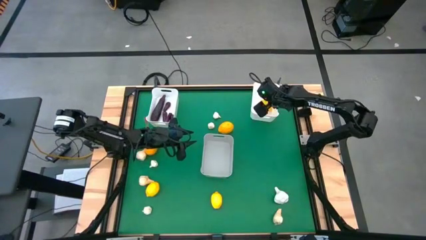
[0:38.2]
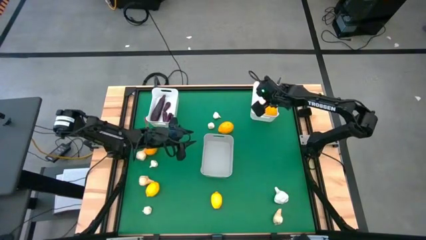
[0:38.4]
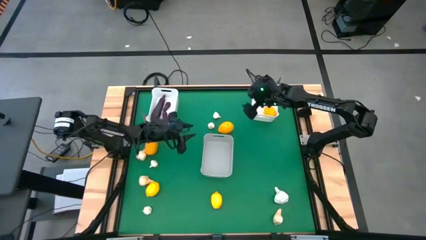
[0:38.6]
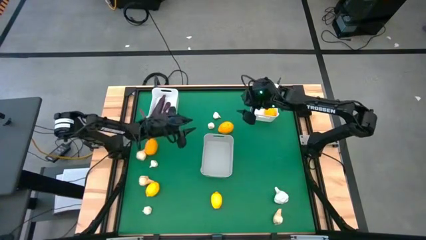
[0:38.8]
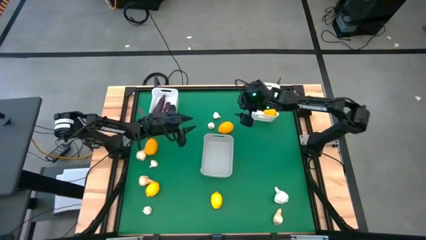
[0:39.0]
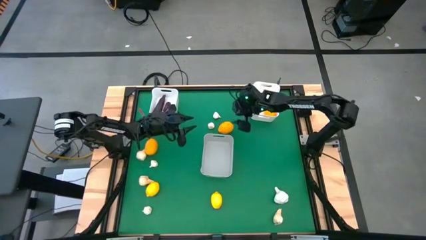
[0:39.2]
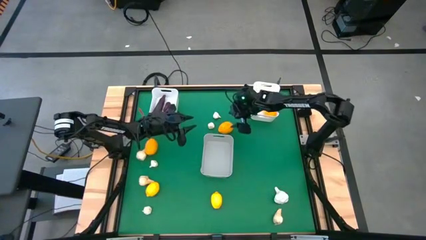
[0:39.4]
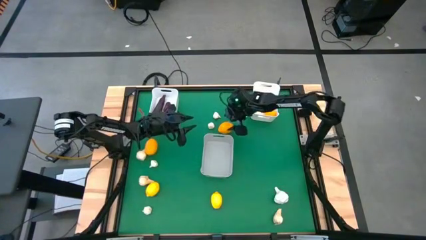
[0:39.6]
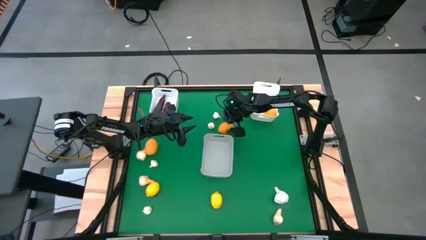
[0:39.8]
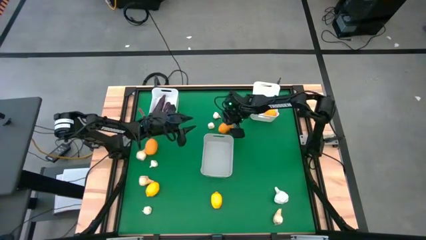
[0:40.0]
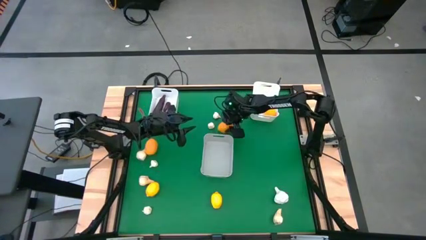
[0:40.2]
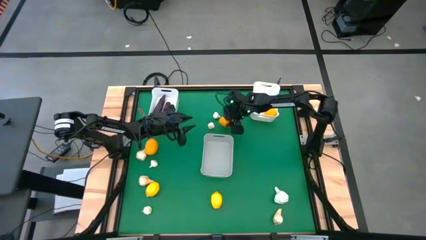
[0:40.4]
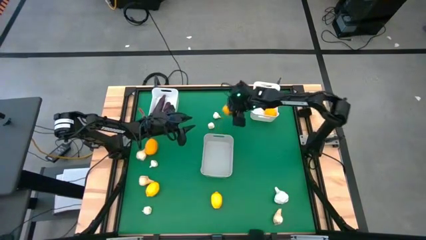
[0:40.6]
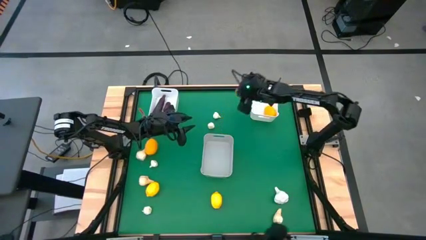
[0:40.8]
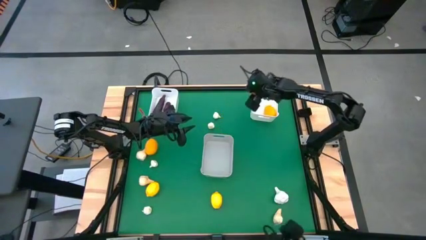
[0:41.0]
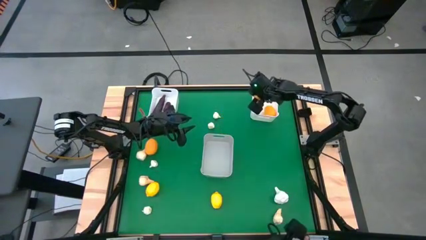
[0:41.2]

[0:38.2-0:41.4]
Task: Sort produce into baskets
Put the lemon into the right white bin

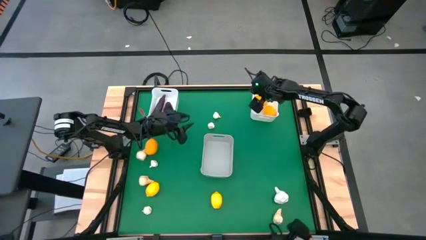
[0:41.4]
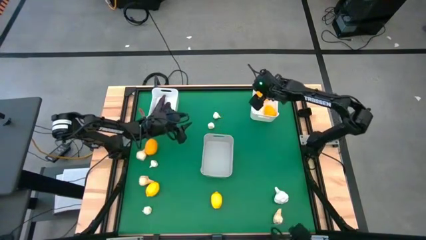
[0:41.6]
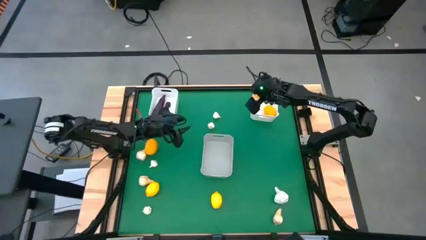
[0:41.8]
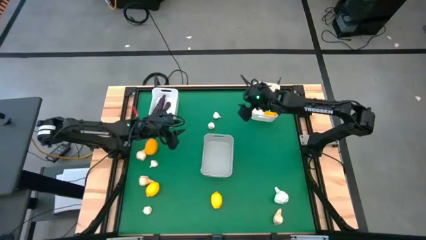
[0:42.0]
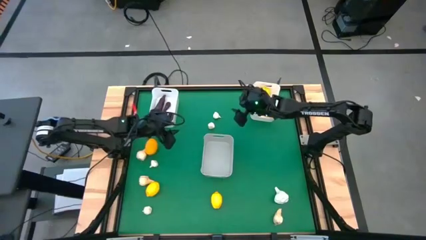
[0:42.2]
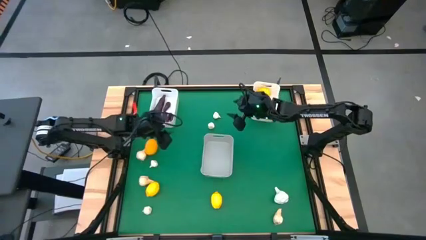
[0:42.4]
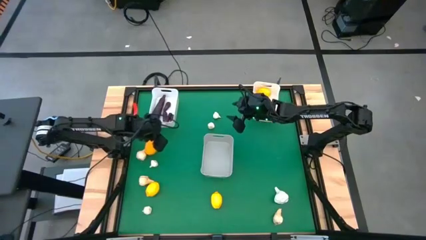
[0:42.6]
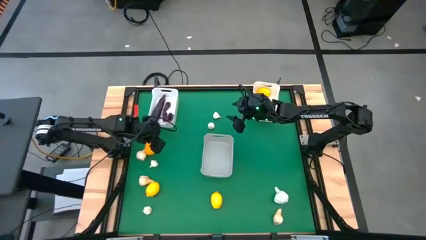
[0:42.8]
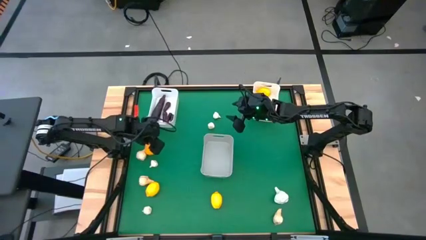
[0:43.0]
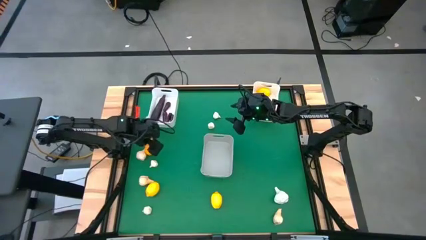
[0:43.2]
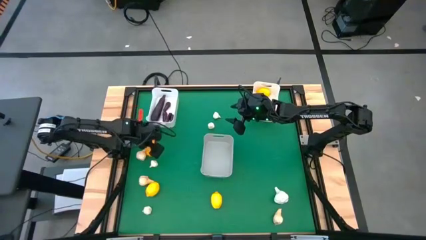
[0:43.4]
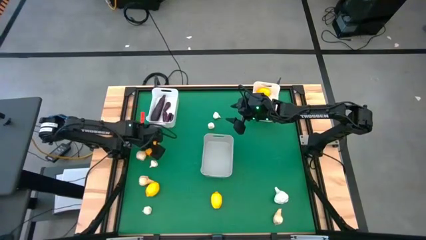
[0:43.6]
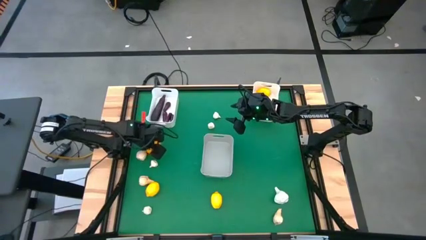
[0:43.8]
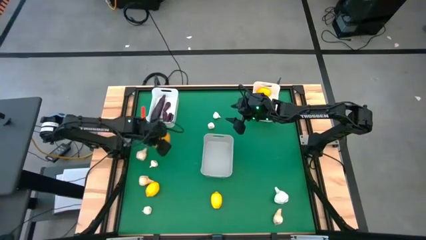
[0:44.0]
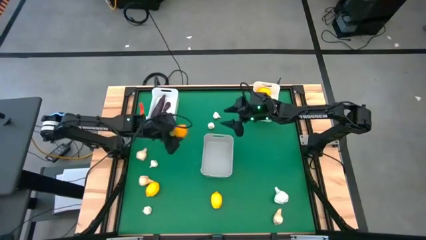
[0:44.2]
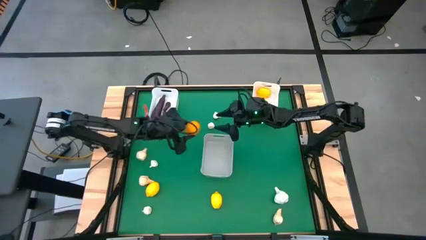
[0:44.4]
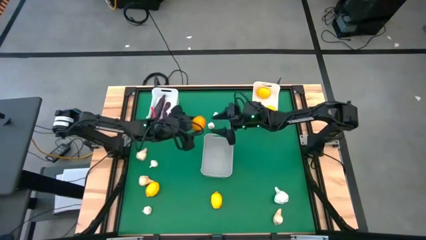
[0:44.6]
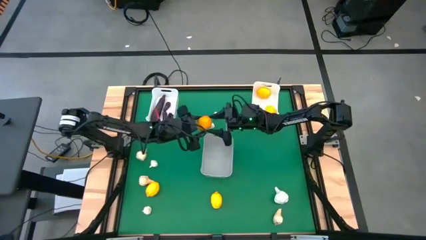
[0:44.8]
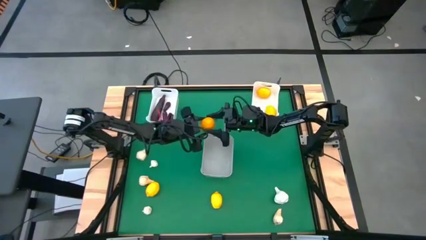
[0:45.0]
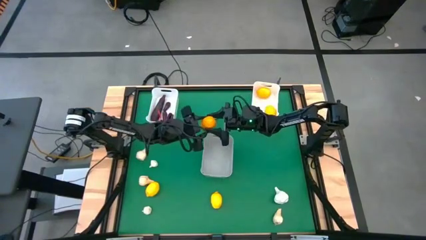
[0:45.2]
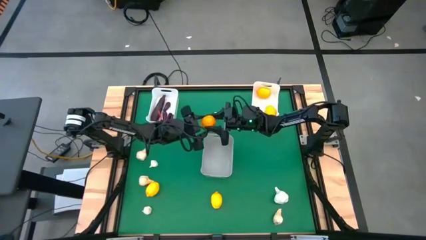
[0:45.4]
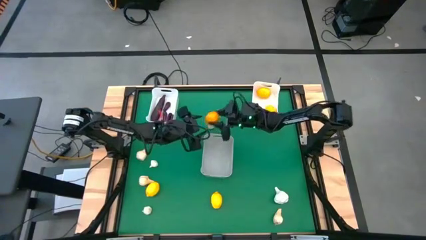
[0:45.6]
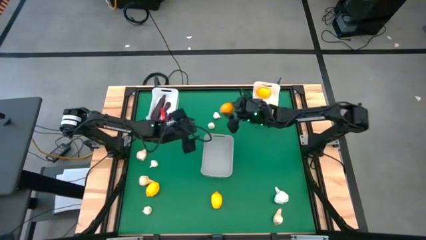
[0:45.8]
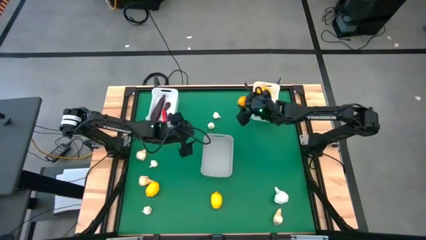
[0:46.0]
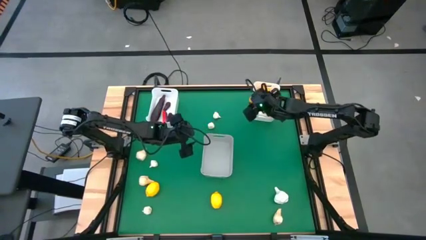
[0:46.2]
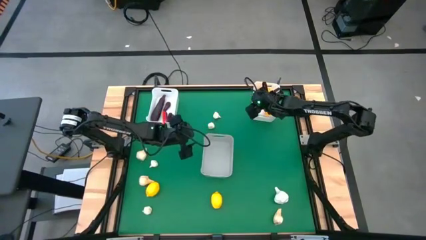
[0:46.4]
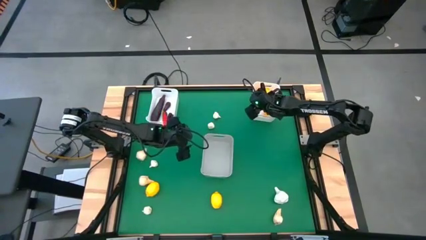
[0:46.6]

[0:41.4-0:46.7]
Put the lemon into the right white bin

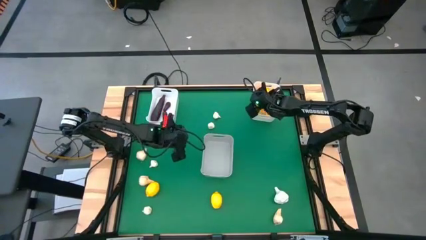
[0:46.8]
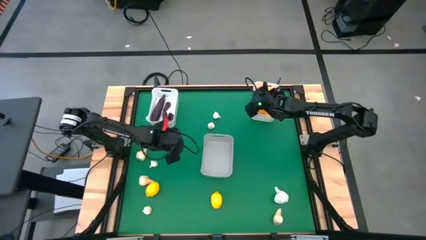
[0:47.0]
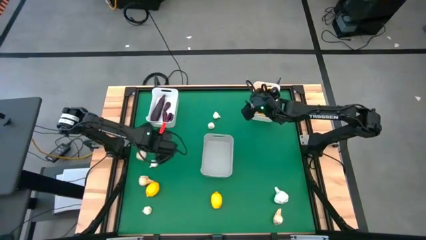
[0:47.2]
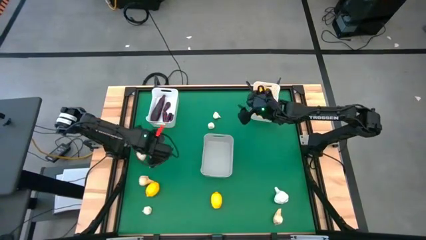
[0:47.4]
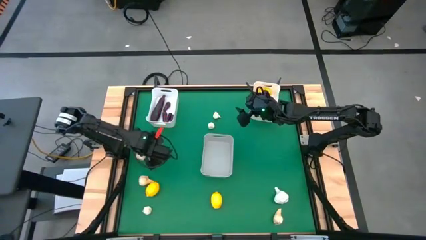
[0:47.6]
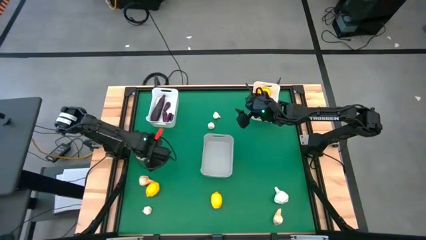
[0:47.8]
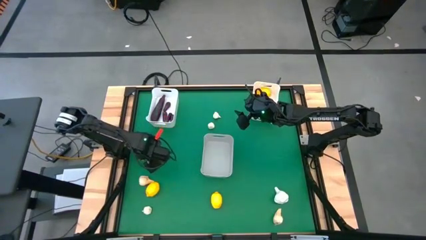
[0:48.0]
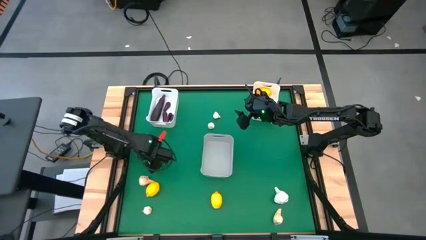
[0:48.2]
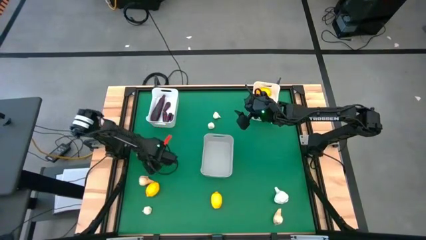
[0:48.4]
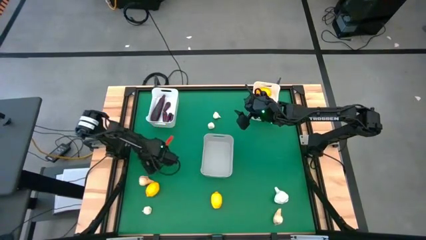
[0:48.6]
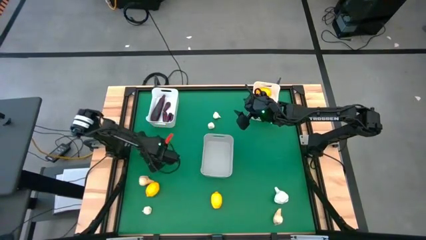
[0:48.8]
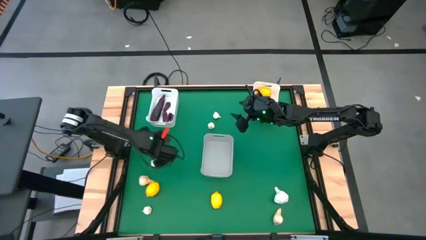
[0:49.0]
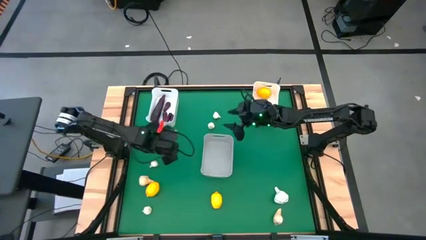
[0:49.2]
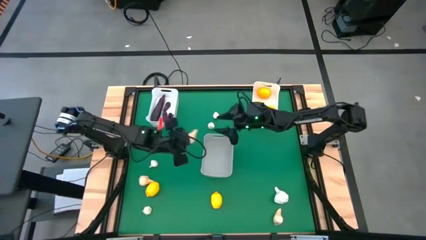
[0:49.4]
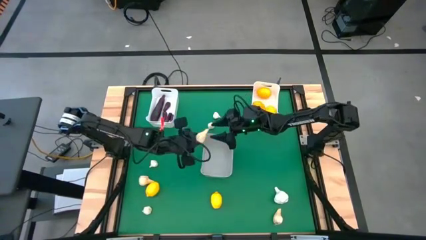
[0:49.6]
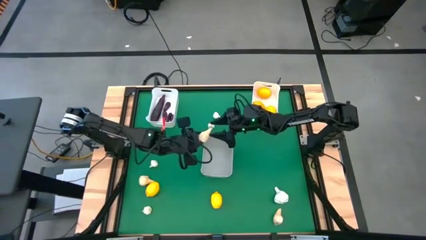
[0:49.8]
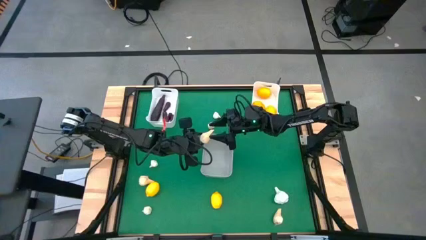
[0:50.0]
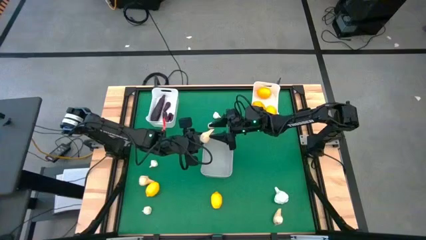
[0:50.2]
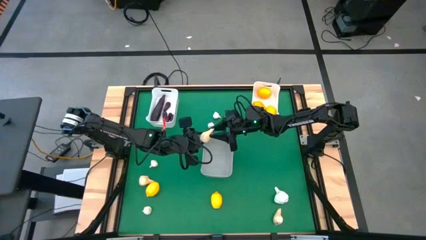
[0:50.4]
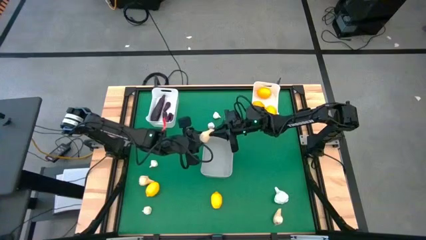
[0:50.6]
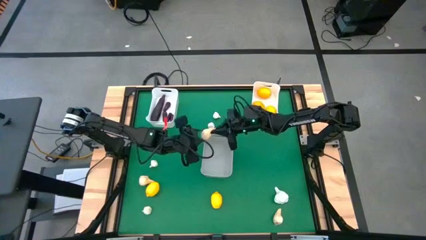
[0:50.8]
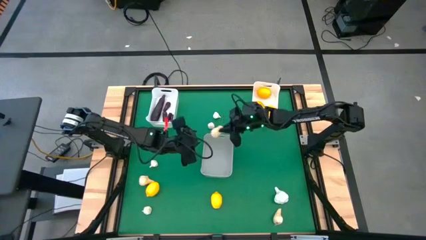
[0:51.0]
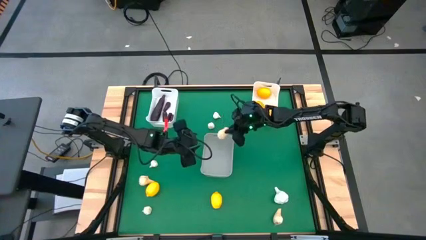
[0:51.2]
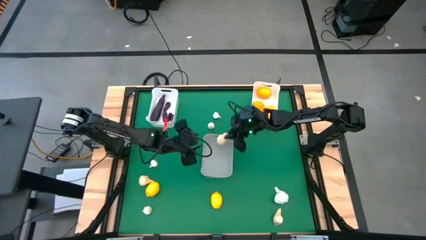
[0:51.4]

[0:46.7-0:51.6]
Put the garlic into the gray bin

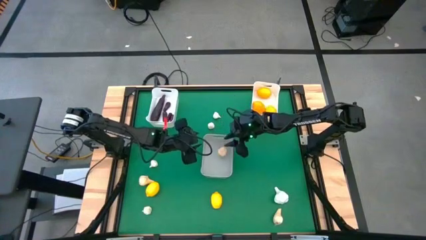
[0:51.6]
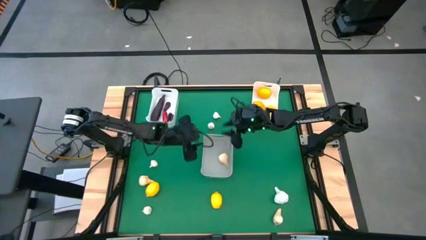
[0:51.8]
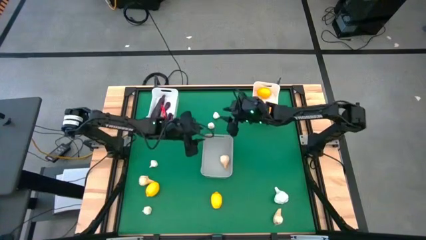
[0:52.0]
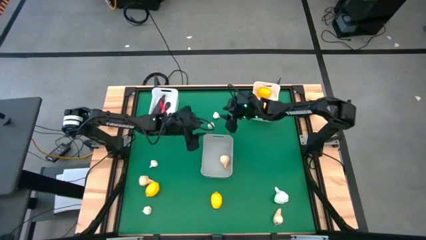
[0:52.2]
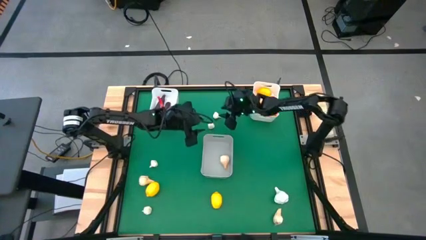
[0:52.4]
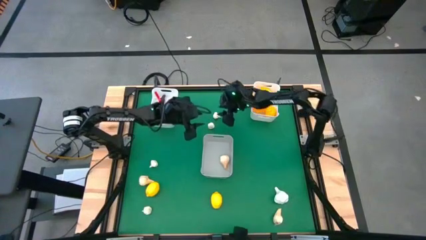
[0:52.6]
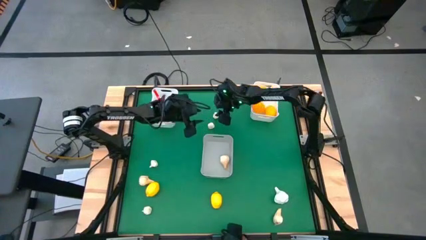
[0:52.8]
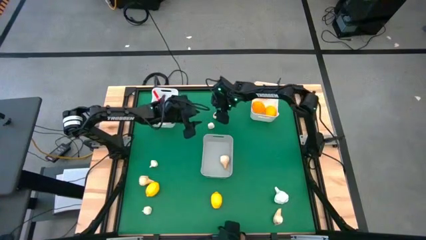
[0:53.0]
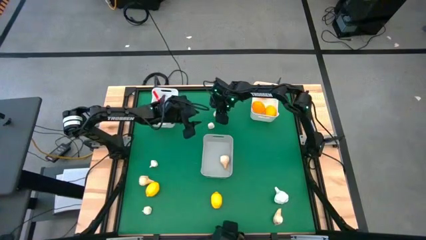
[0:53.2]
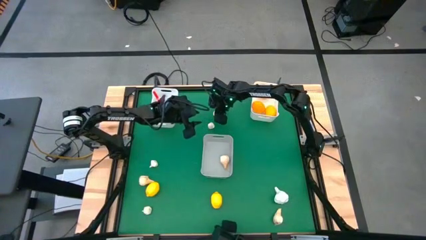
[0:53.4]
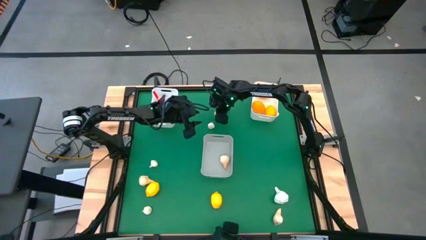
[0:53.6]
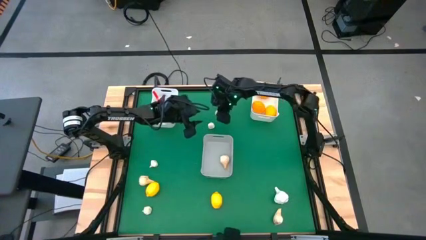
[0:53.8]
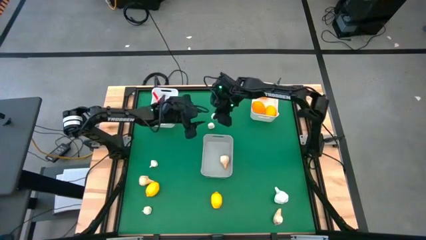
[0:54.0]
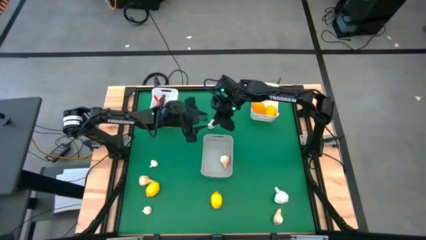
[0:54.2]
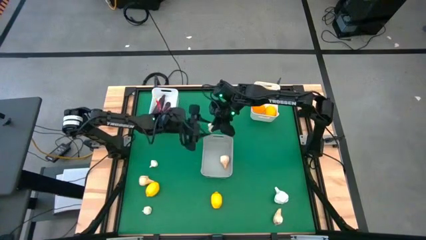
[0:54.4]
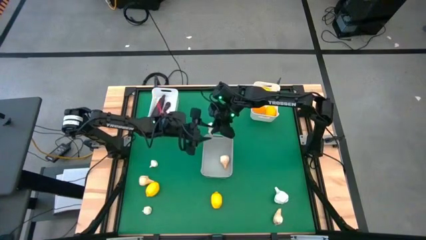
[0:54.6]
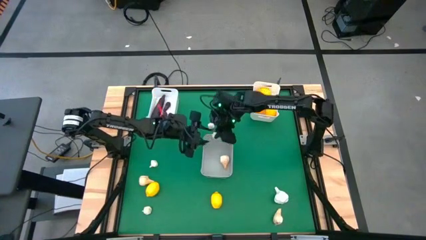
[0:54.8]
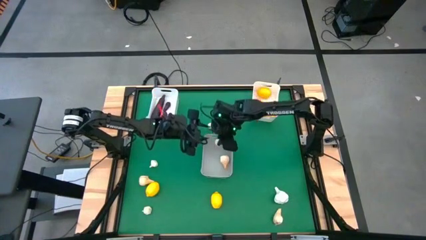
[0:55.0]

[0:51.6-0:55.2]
Put the garlic into the gray bin
